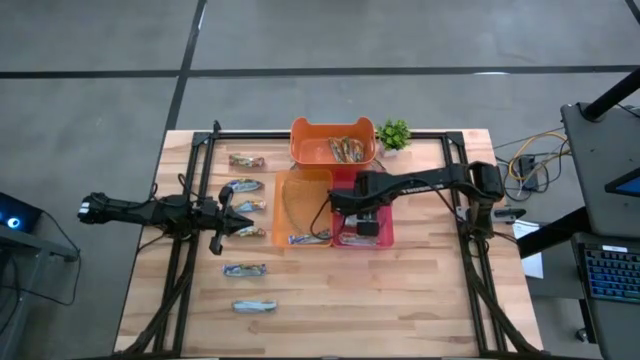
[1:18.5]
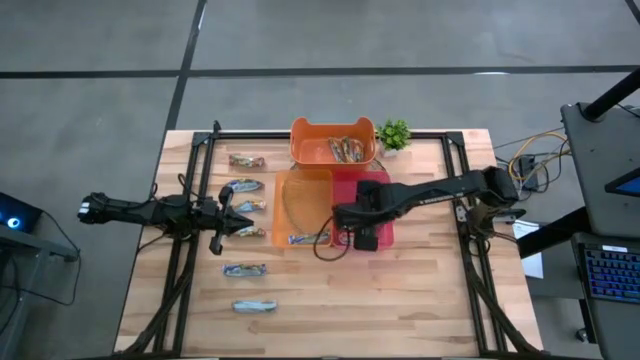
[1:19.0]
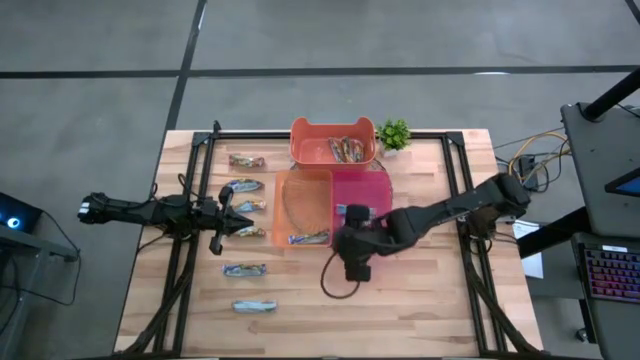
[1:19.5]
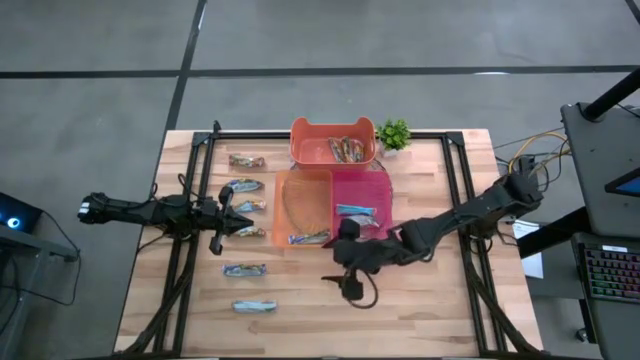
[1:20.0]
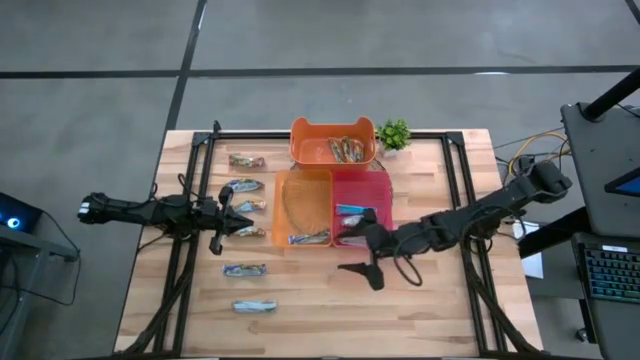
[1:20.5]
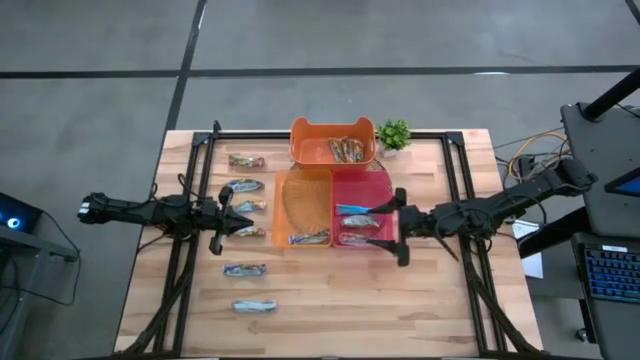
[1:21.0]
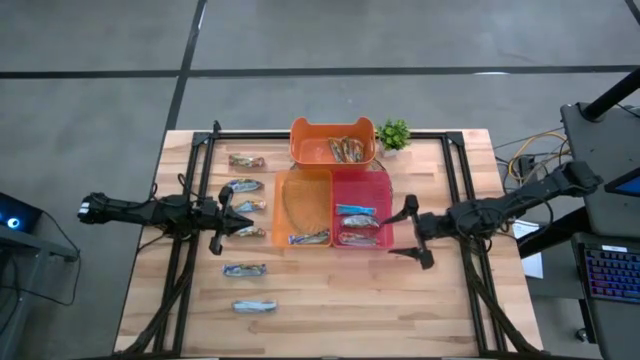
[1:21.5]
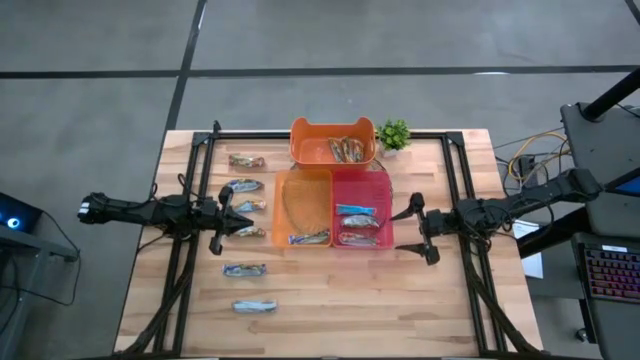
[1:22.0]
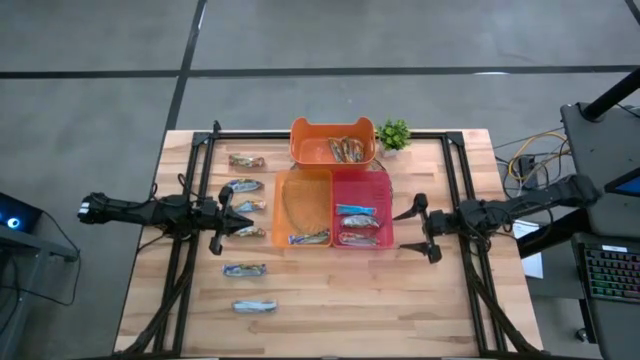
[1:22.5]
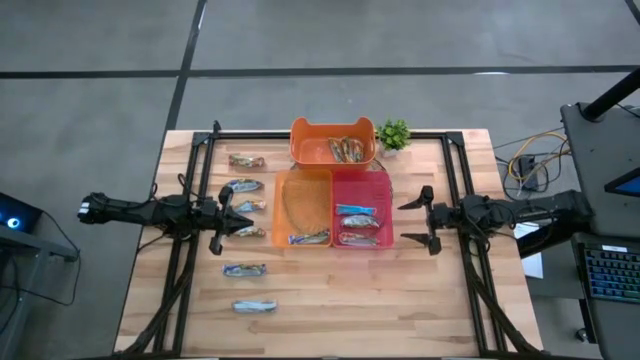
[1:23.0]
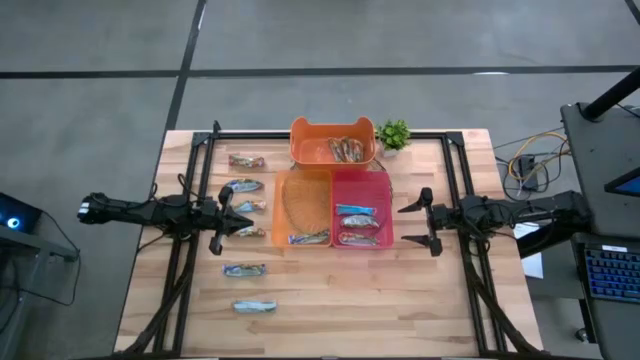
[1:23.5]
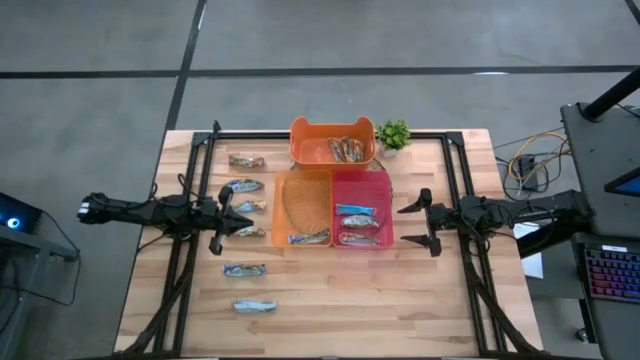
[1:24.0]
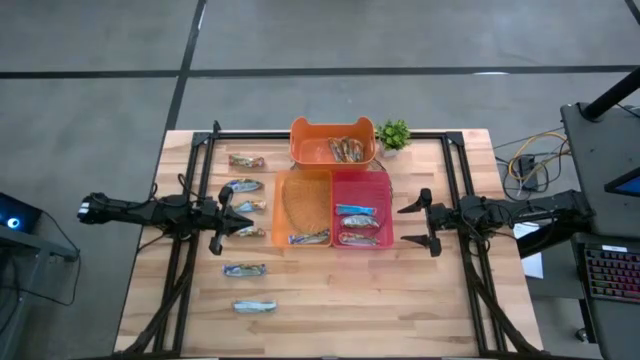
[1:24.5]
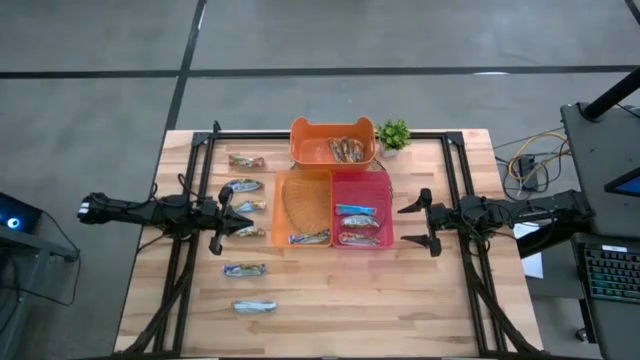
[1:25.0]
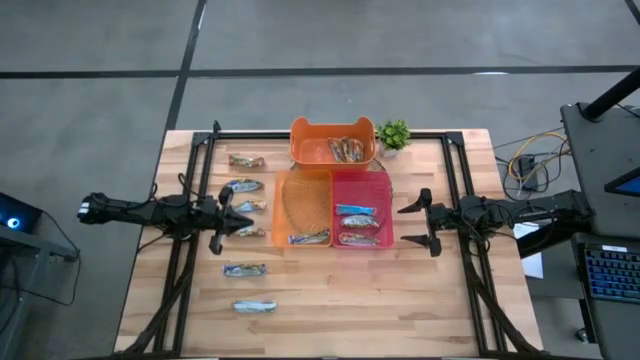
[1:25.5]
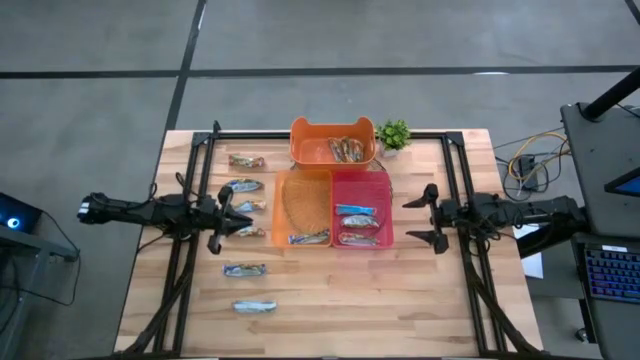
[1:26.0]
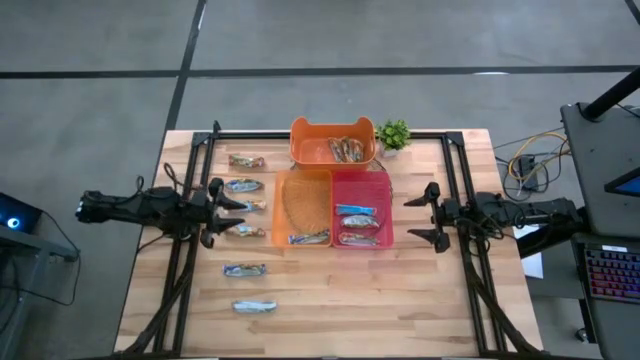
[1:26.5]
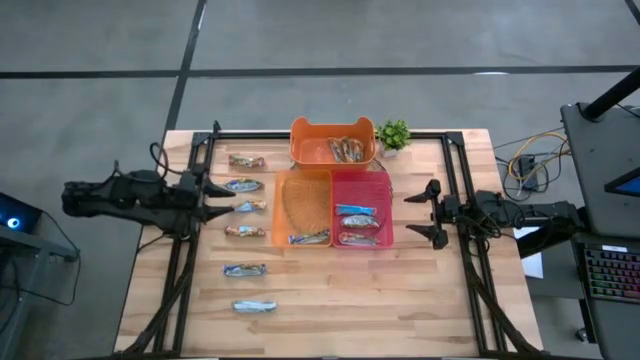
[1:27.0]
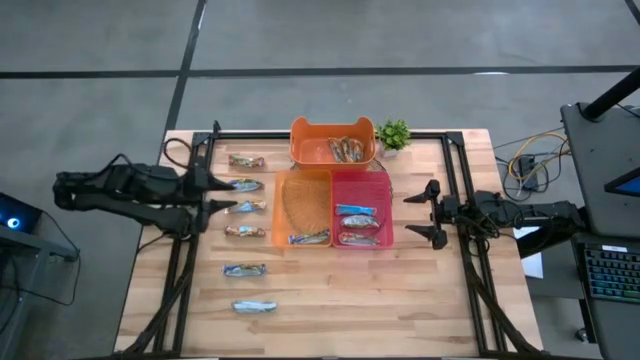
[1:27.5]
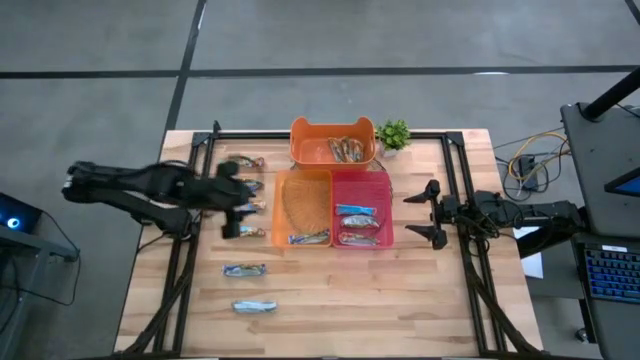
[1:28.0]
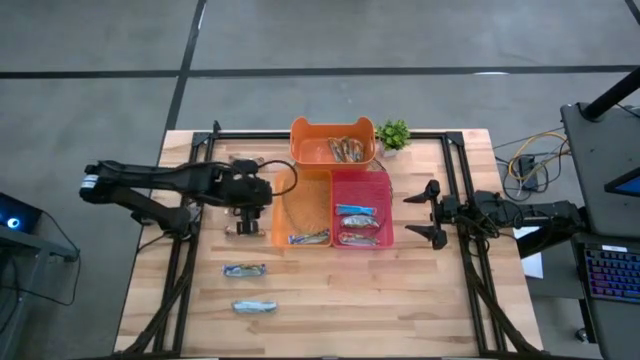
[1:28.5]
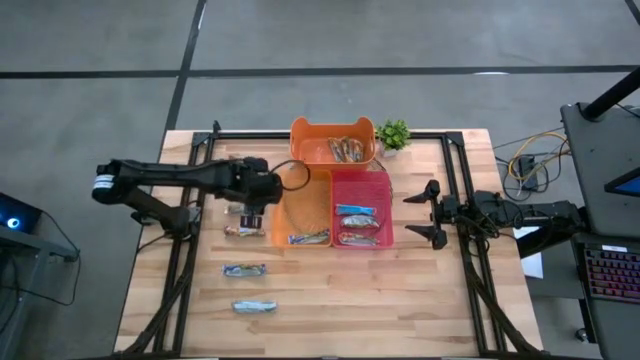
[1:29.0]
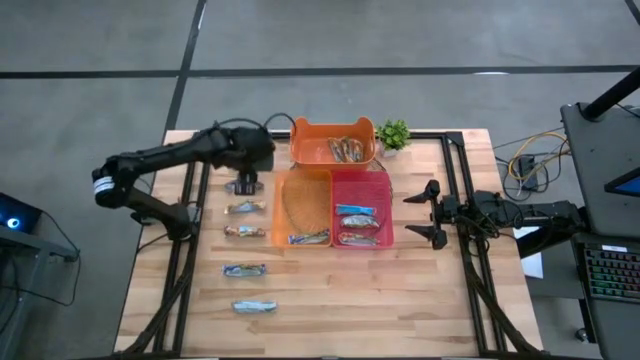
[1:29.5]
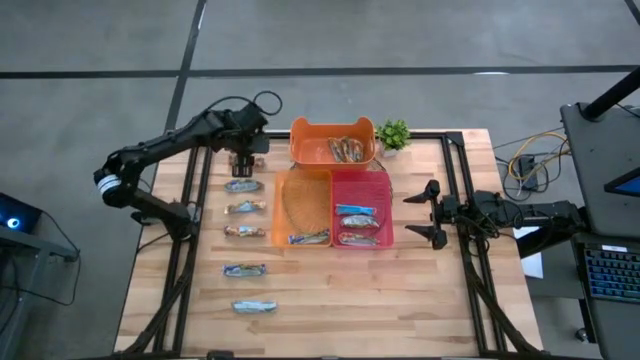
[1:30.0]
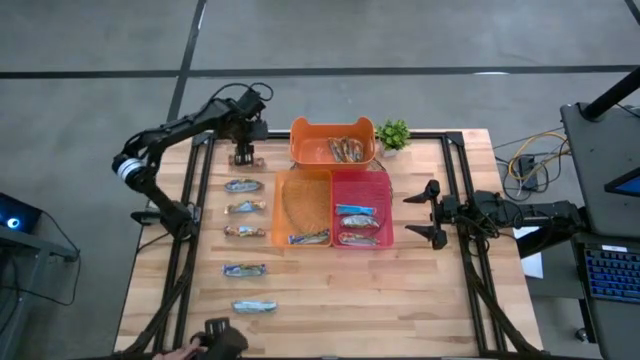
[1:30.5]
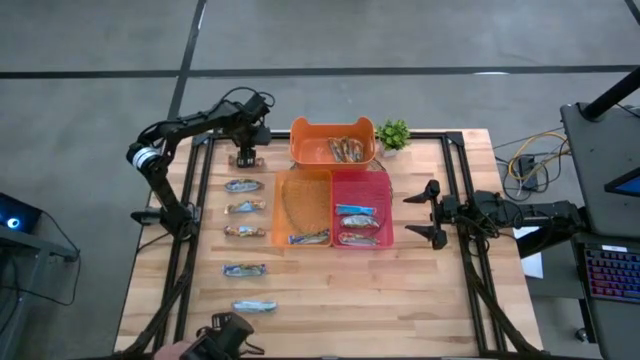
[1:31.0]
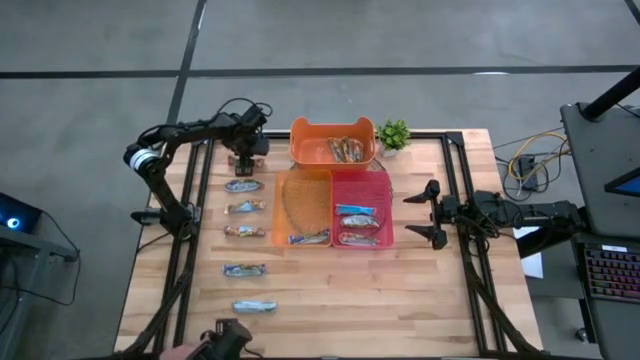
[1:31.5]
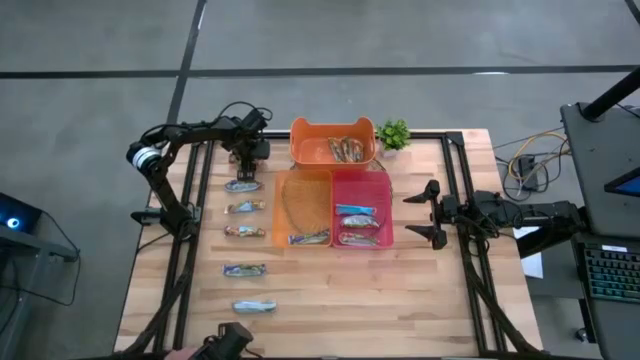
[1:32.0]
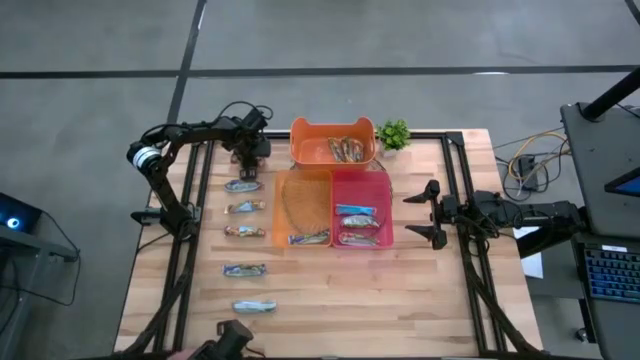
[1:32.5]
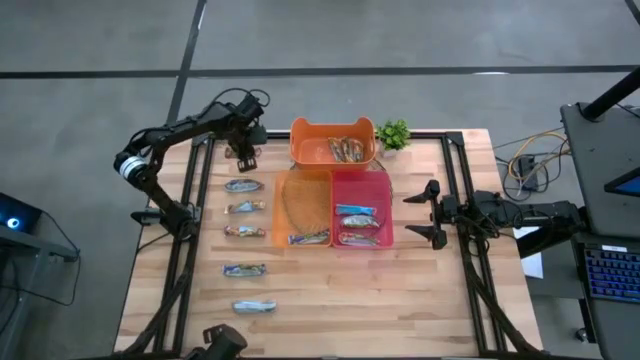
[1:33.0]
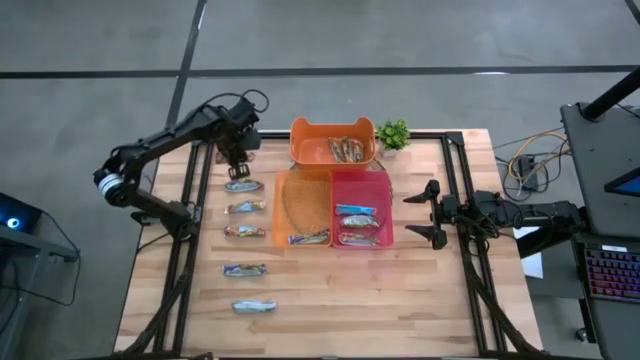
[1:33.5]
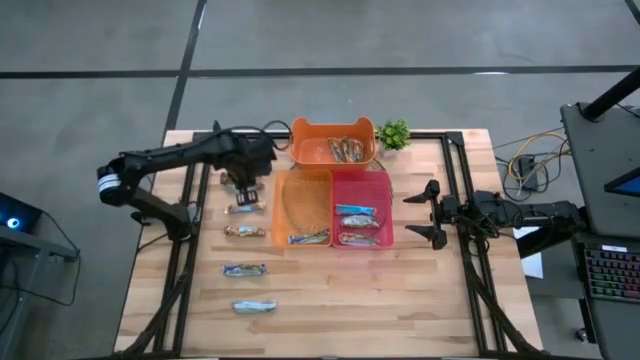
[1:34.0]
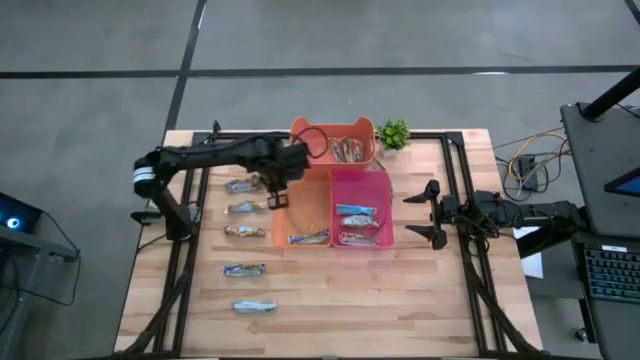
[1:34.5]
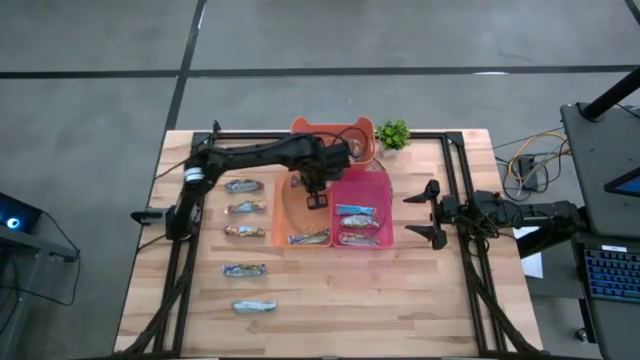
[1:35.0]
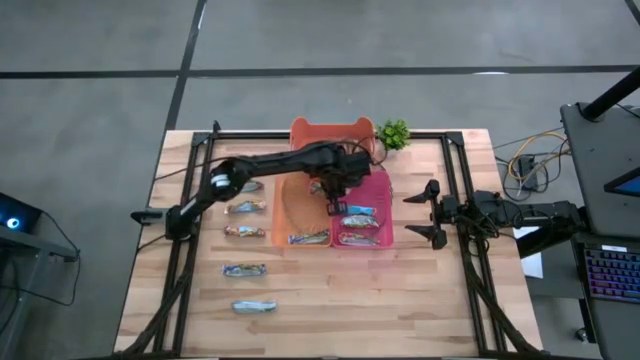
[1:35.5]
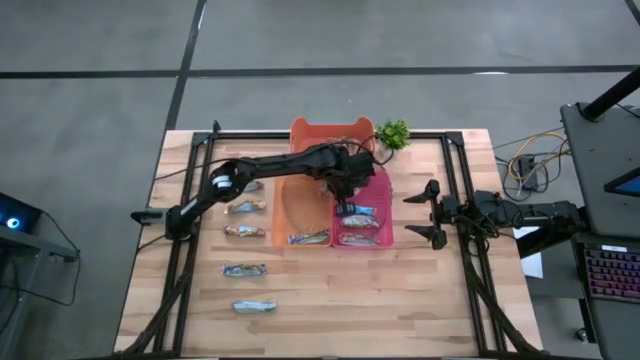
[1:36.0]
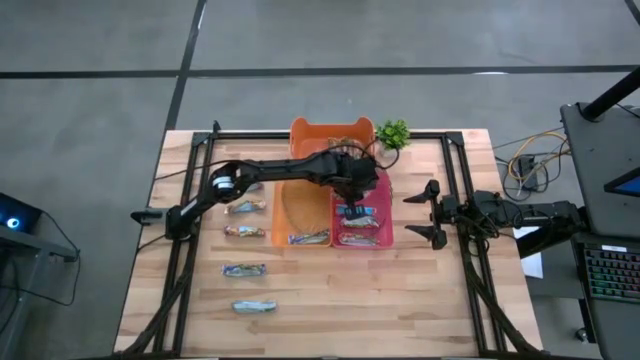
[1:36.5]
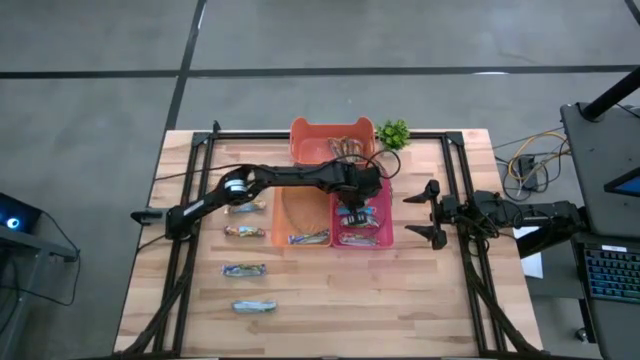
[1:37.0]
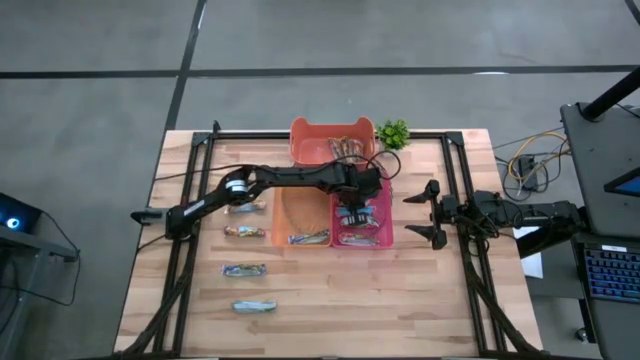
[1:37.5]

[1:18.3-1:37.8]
Task: Pick and place Granola Bars by type
Put the red granola bar into the pink bin

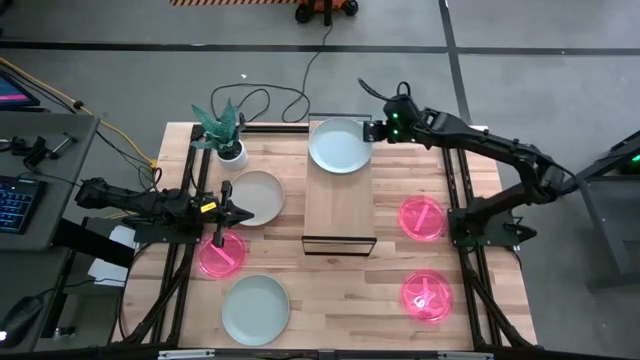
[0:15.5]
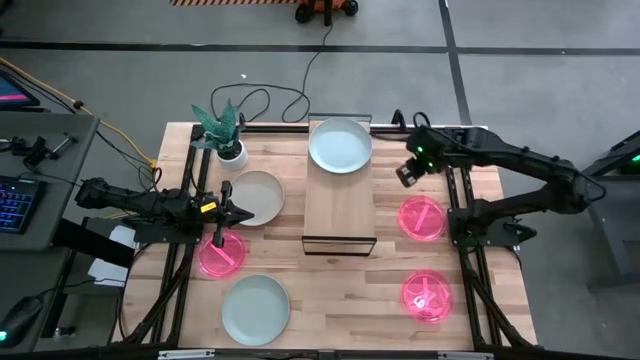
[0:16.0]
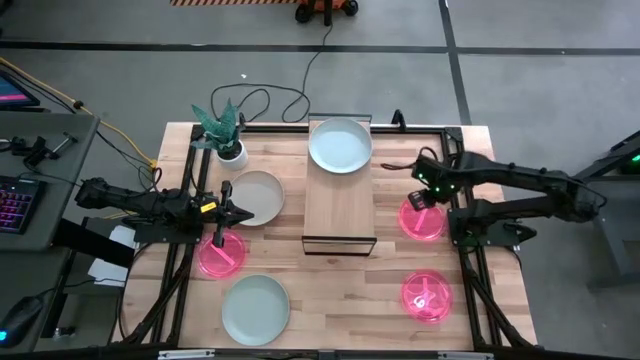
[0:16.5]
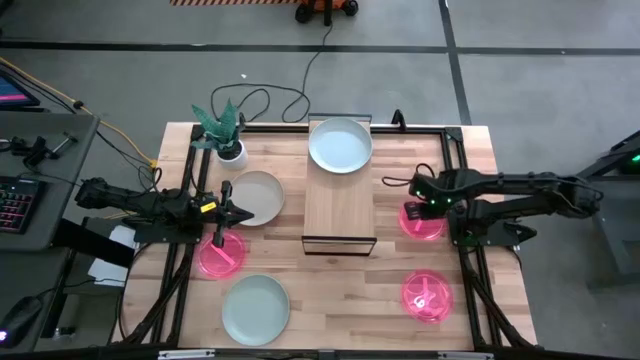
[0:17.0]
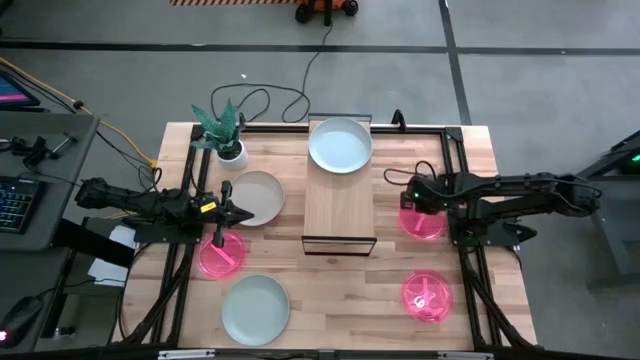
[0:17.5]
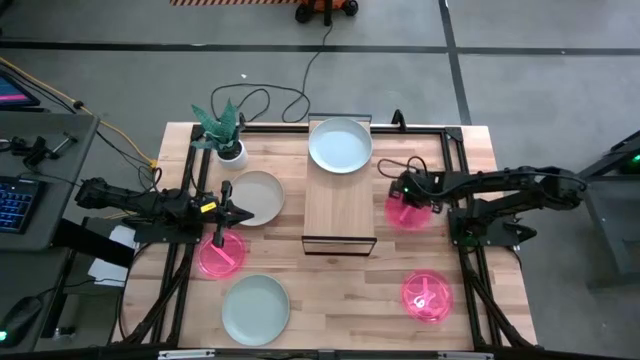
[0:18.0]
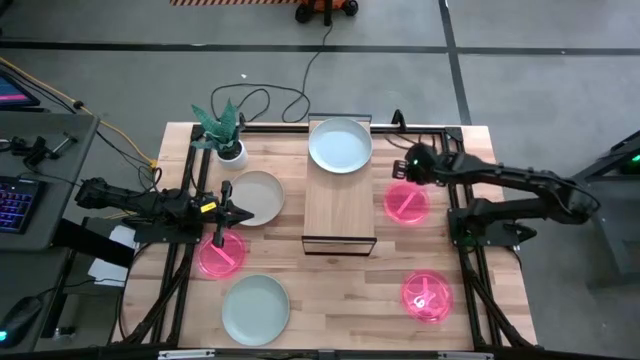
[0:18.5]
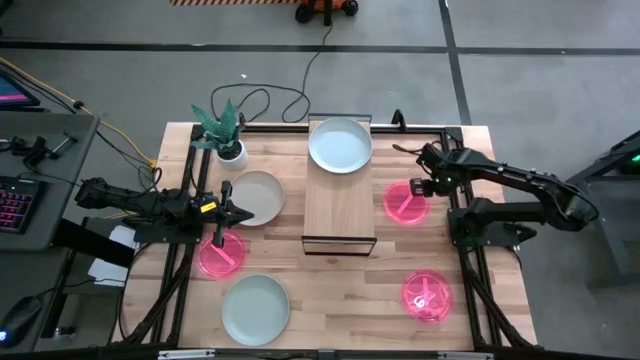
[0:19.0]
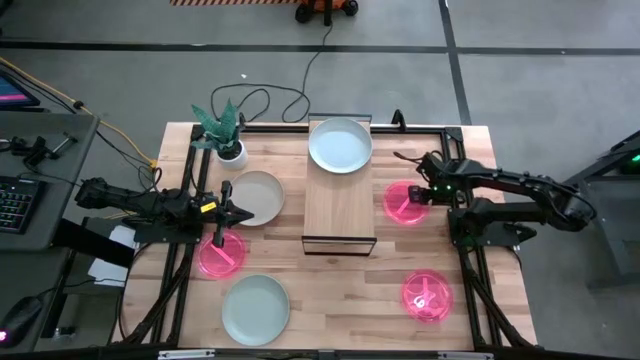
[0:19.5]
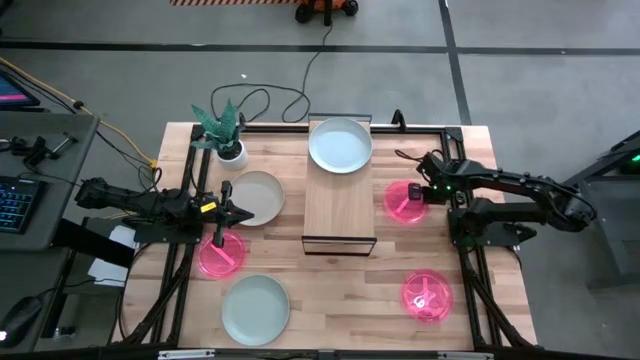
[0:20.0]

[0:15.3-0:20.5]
Task: Place and stack plates onto a shelf
Put the top pink plate on the shelf
